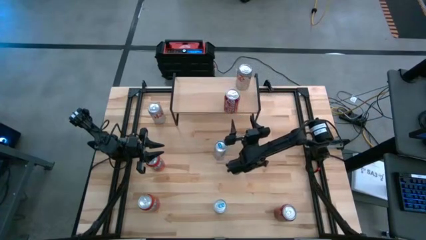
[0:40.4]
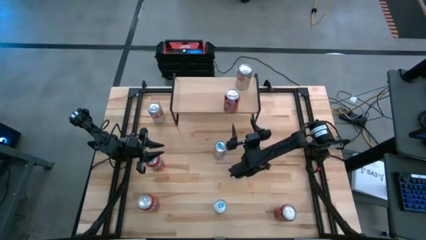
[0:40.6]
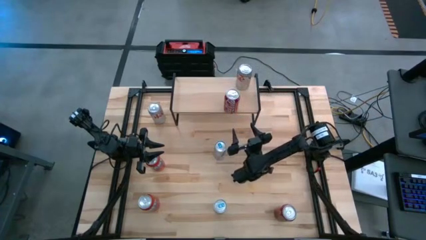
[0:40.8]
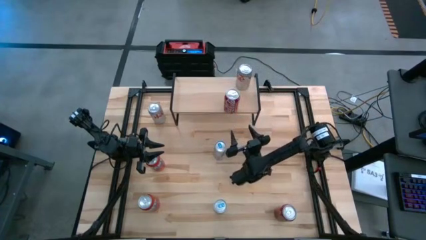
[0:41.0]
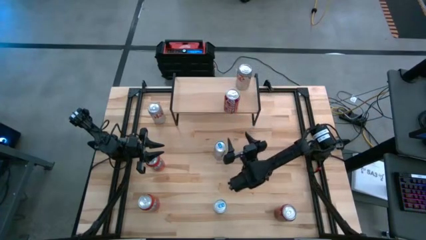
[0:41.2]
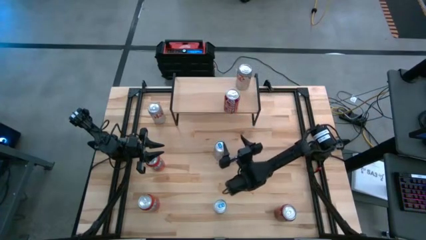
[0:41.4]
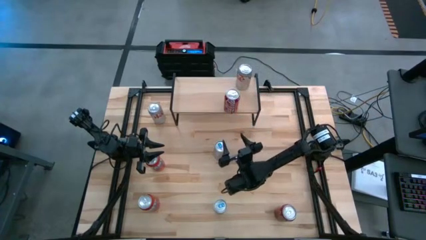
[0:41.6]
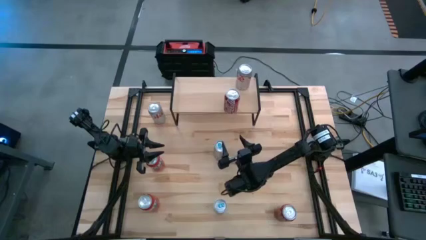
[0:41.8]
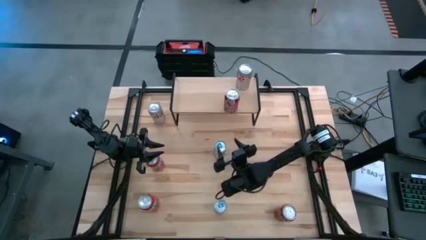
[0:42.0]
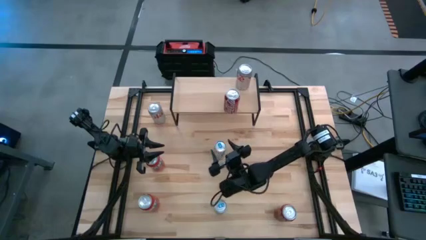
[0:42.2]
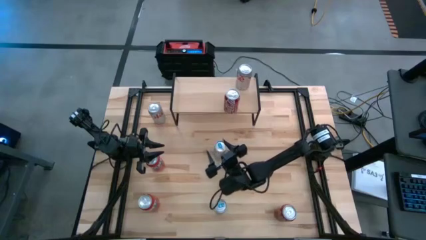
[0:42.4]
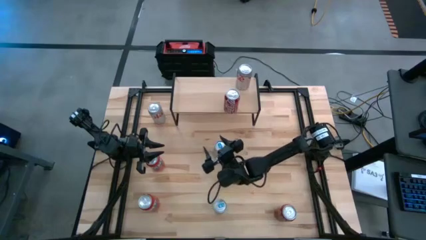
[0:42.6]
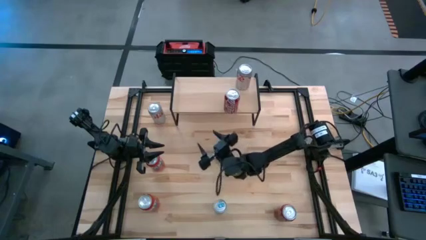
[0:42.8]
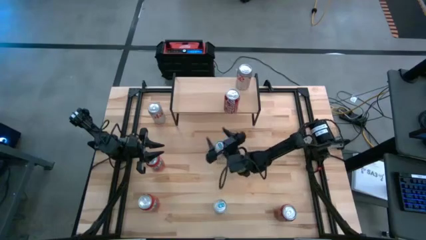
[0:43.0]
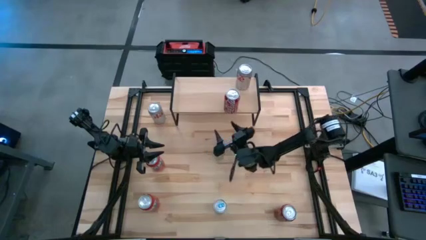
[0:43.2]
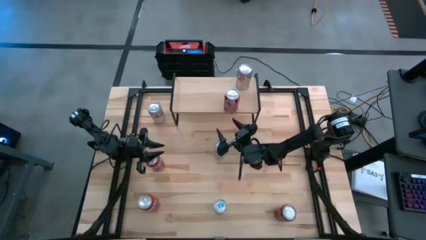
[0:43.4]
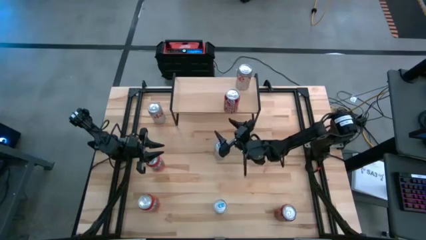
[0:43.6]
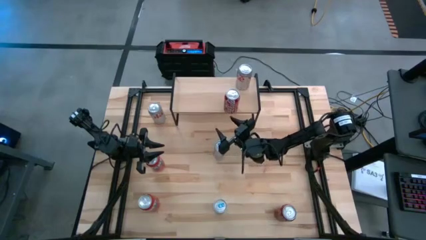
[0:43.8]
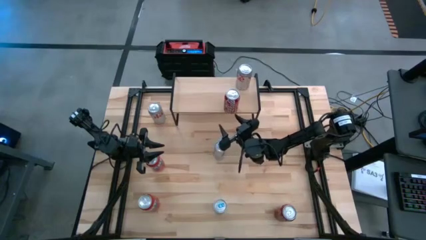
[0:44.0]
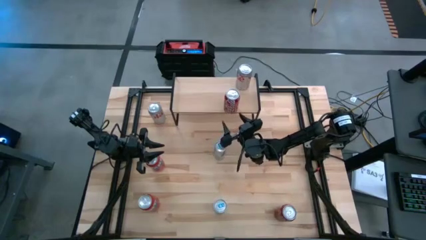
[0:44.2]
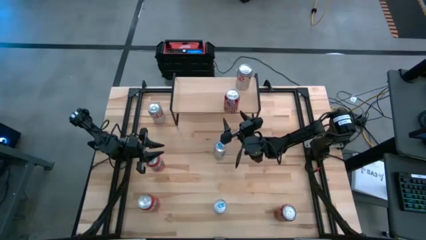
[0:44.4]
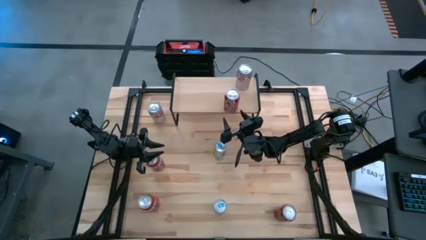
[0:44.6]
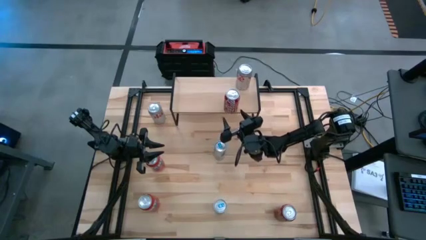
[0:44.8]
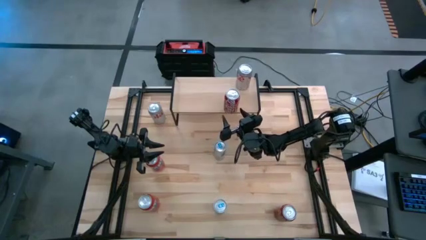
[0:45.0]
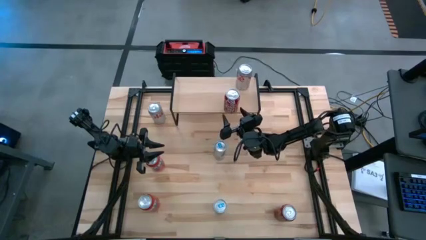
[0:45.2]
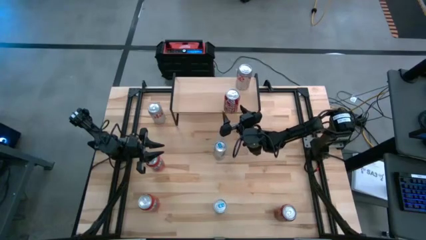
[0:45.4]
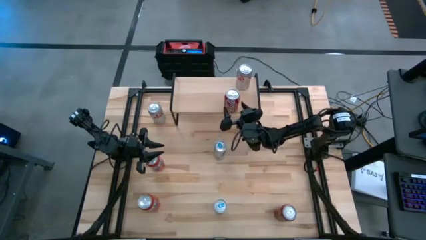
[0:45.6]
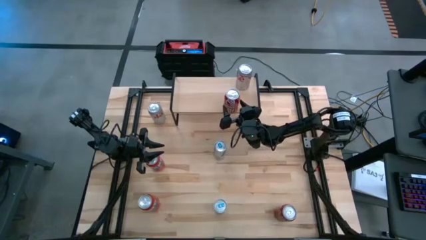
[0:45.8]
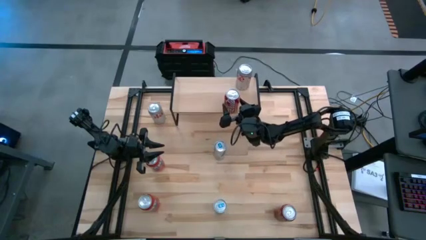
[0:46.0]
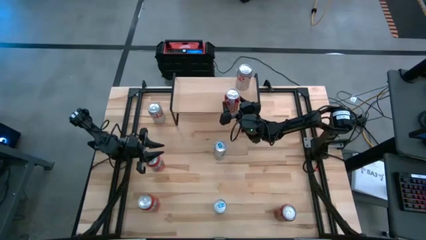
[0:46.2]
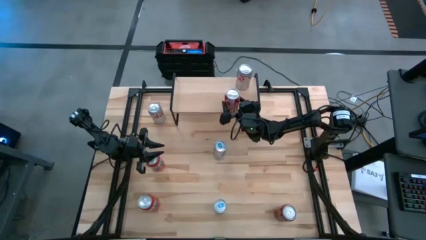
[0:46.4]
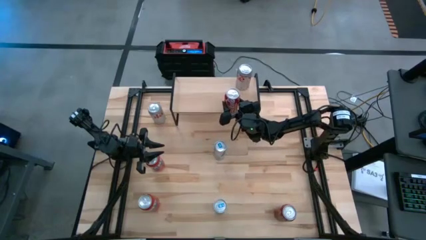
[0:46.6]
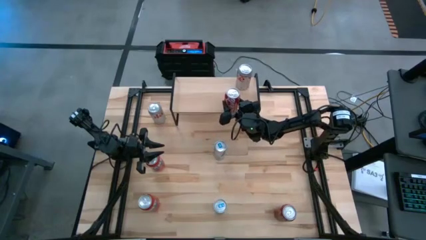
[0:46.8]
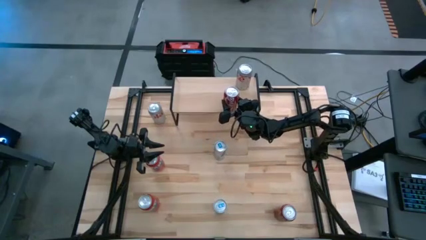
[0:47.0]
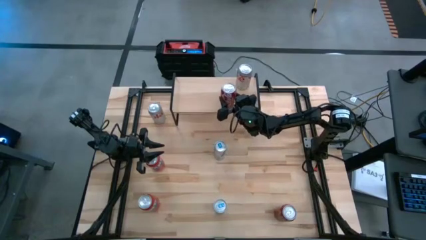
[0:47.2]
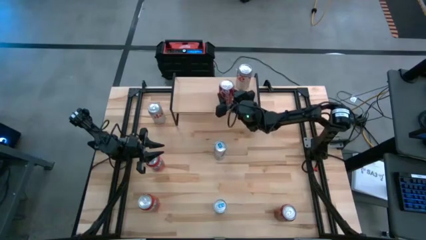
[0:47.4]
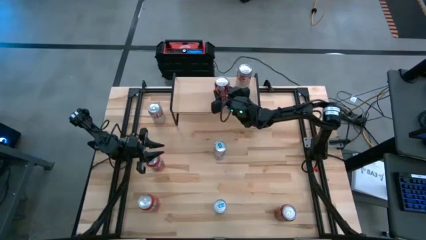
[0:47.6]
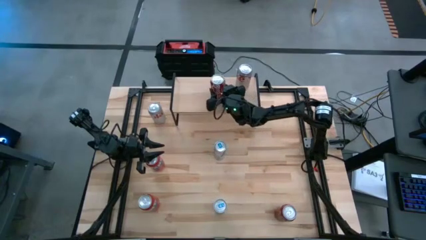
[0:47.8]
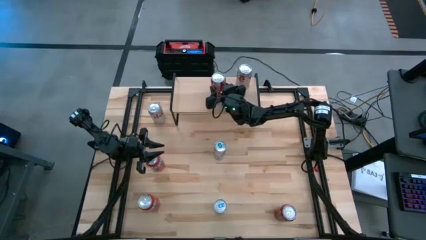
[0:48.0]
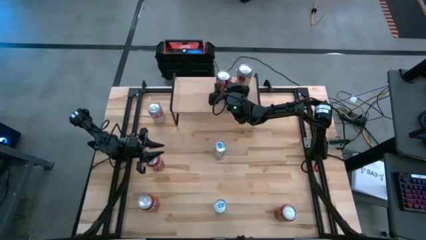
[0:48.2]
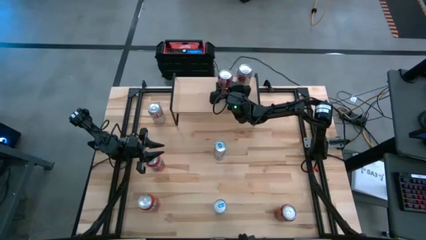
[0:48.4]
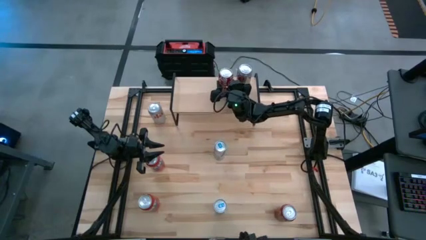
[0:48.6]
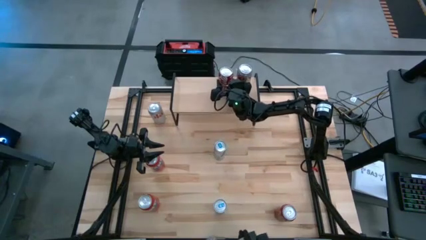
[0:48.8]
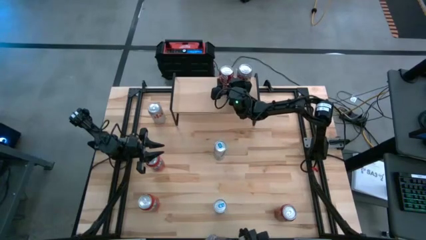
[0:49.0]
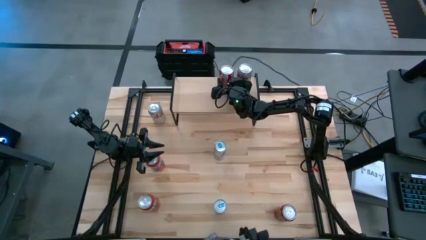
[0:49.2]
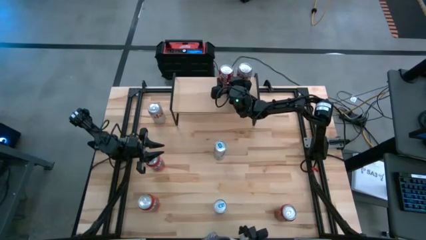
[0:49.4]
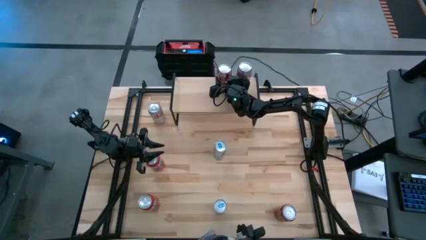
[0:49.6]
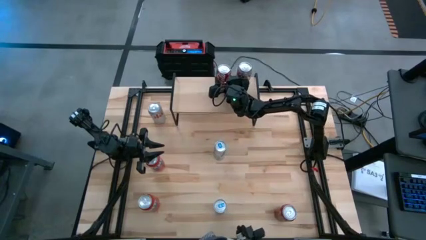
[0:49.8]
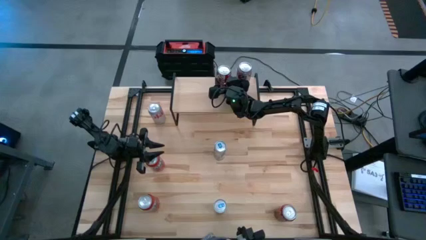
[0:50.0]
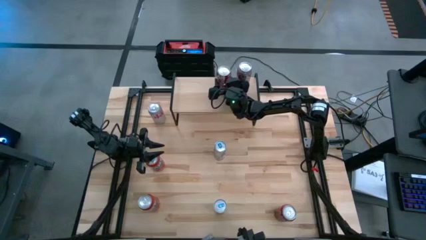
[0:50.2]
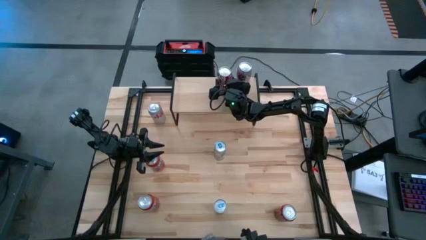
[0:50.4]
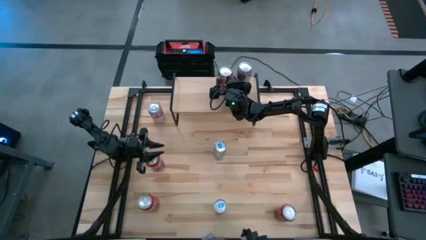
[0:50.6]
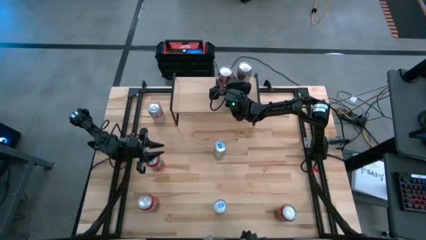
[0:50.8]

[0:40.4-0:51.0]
Task: Place canned beverage on shelf
Put the top red and white soda can on the shelf
